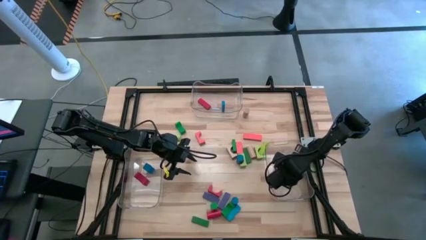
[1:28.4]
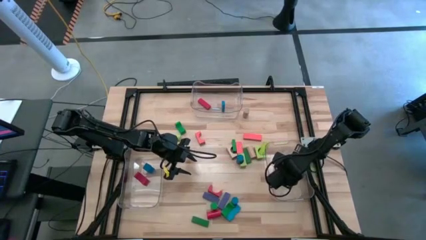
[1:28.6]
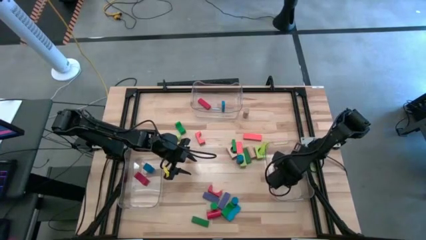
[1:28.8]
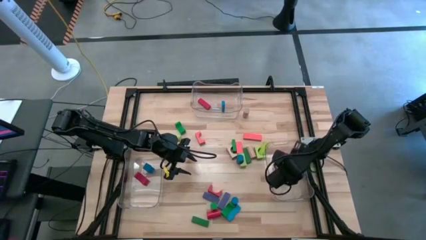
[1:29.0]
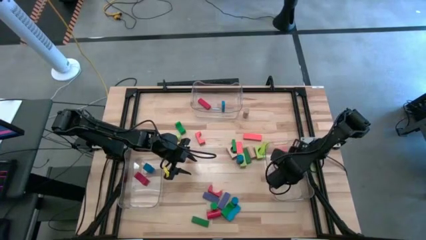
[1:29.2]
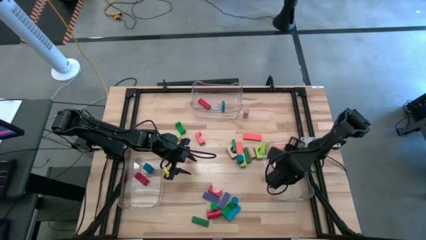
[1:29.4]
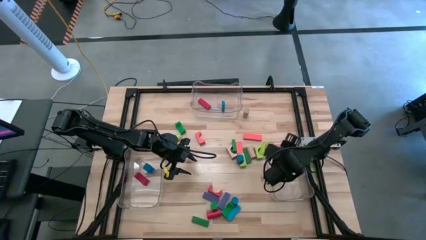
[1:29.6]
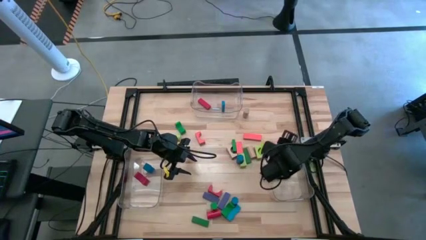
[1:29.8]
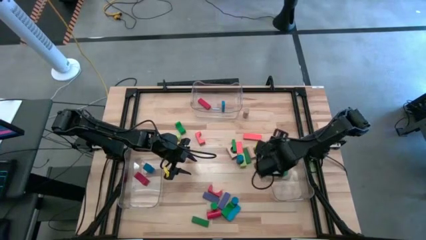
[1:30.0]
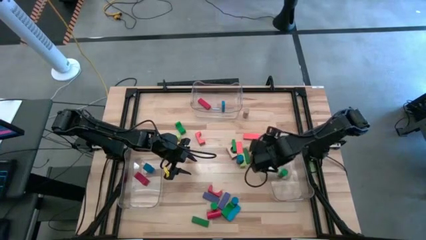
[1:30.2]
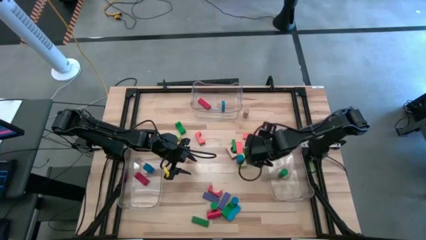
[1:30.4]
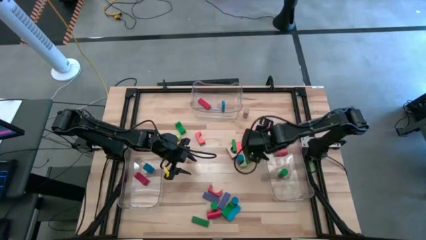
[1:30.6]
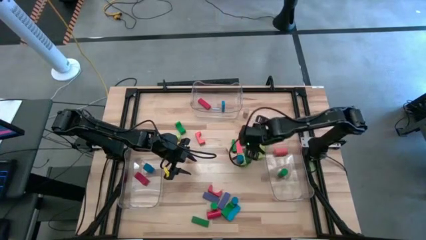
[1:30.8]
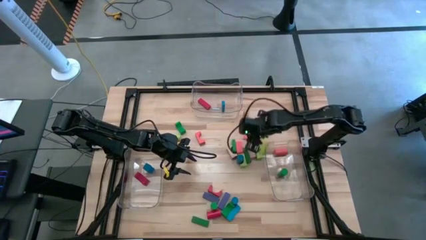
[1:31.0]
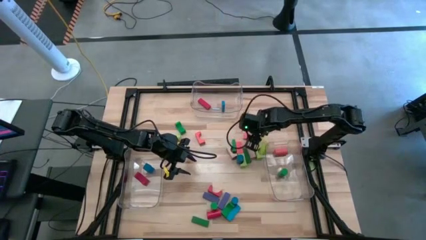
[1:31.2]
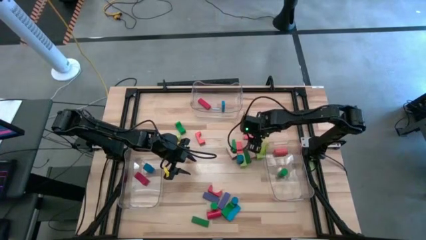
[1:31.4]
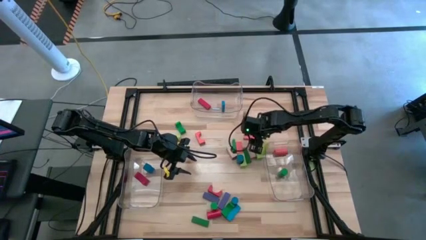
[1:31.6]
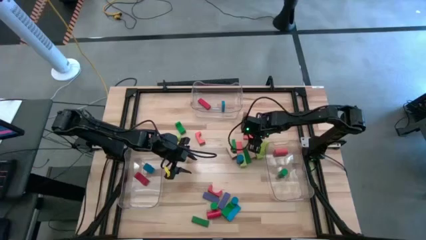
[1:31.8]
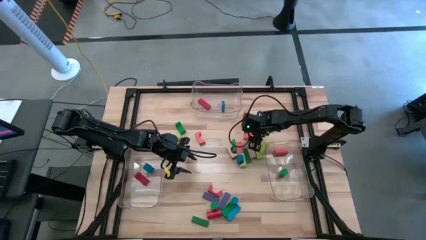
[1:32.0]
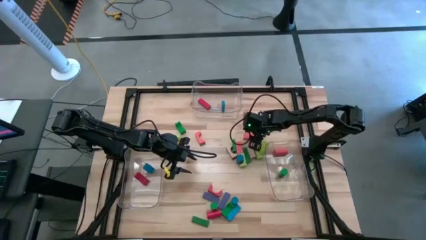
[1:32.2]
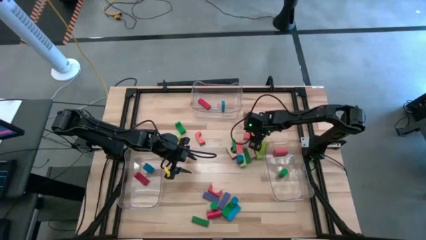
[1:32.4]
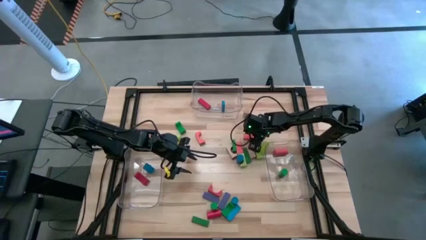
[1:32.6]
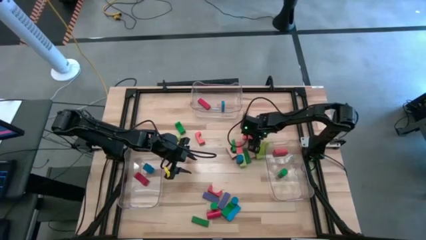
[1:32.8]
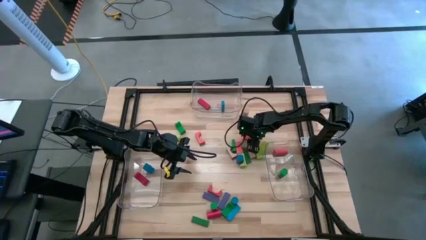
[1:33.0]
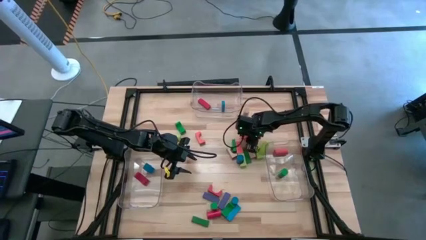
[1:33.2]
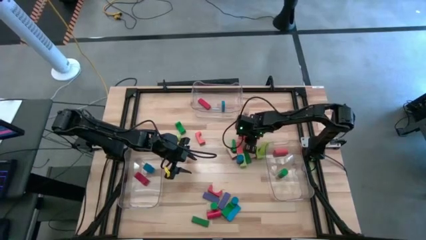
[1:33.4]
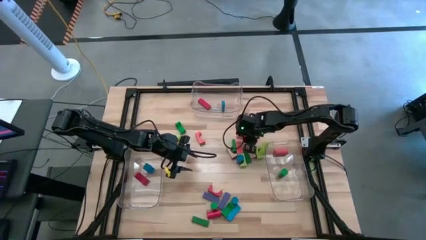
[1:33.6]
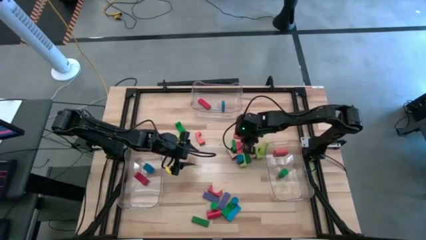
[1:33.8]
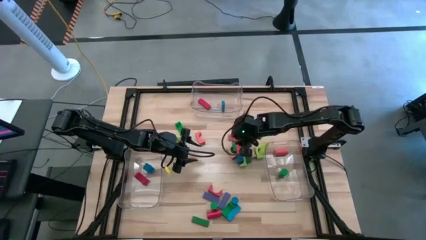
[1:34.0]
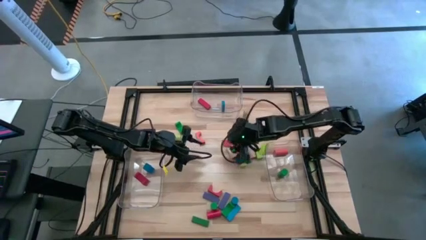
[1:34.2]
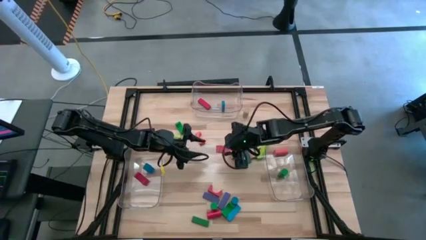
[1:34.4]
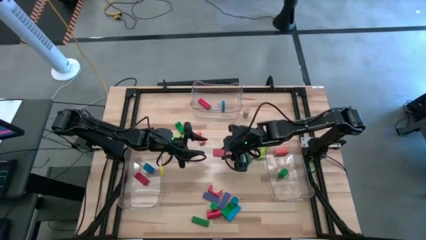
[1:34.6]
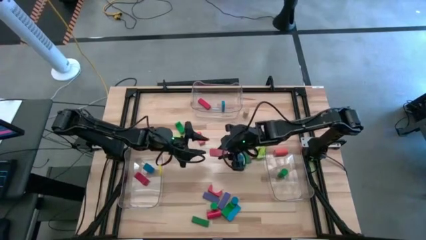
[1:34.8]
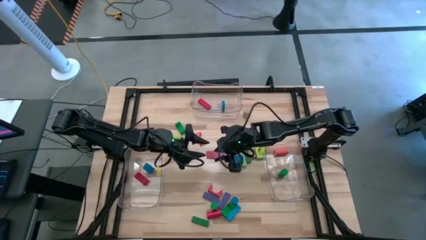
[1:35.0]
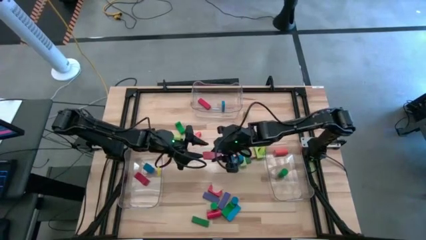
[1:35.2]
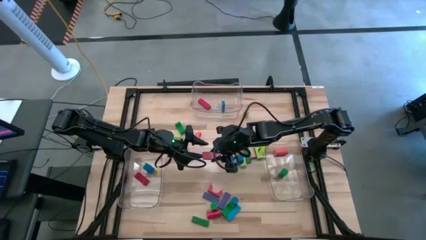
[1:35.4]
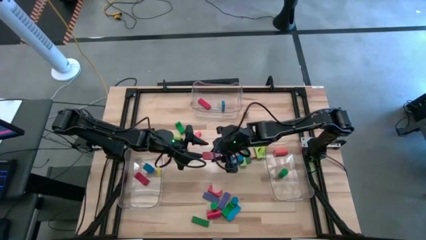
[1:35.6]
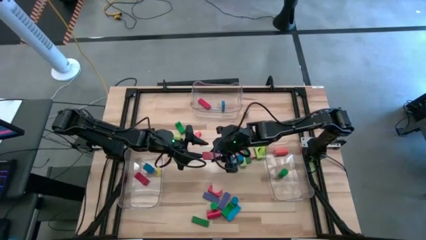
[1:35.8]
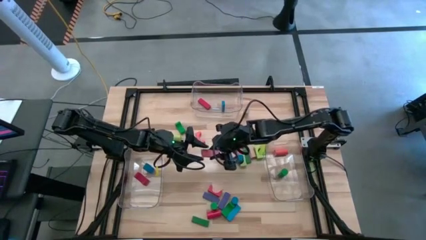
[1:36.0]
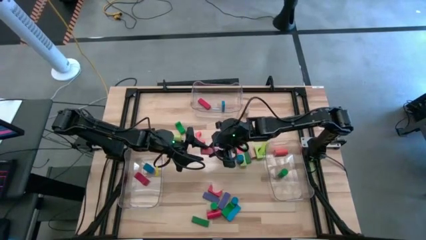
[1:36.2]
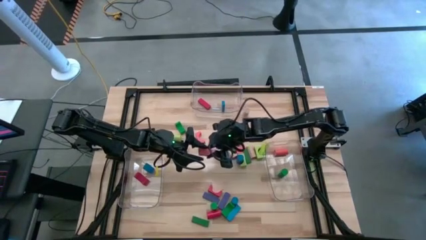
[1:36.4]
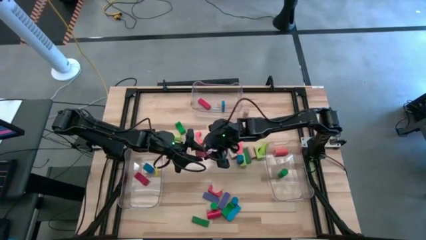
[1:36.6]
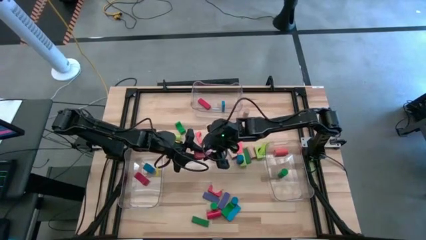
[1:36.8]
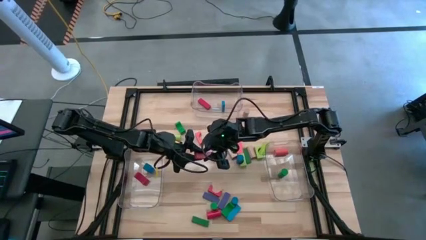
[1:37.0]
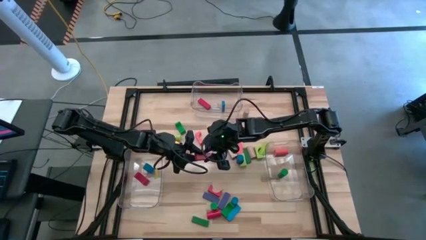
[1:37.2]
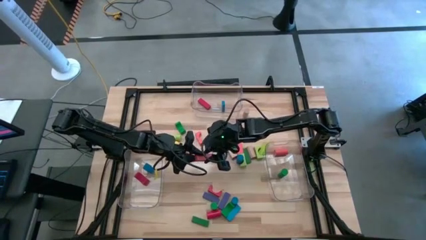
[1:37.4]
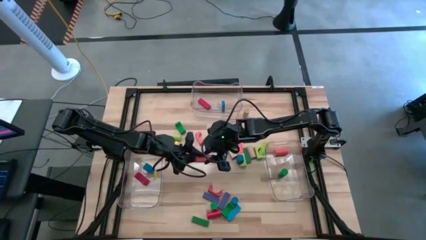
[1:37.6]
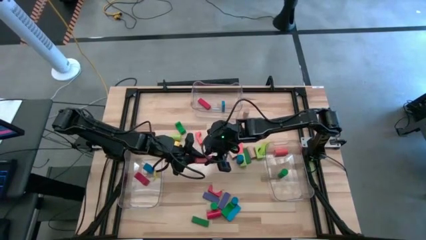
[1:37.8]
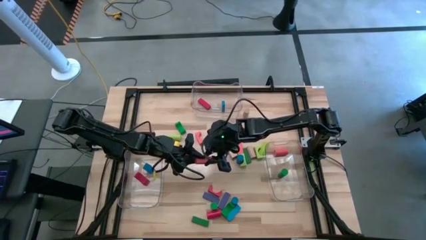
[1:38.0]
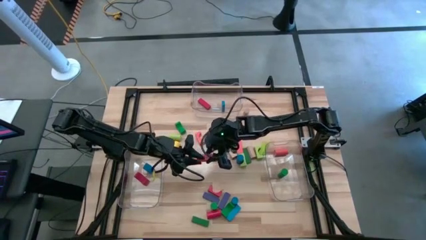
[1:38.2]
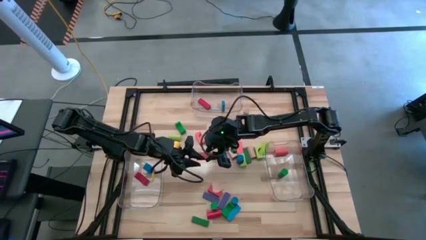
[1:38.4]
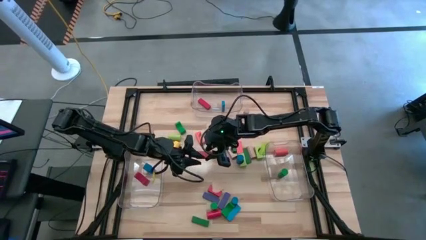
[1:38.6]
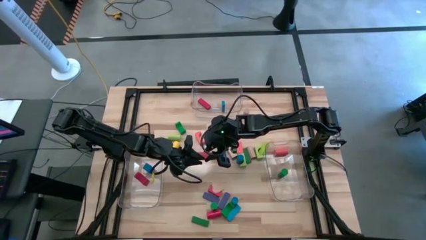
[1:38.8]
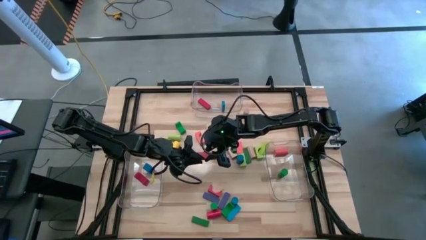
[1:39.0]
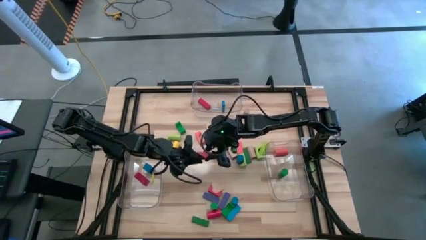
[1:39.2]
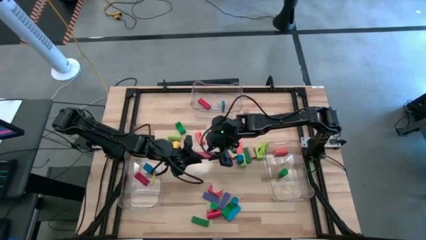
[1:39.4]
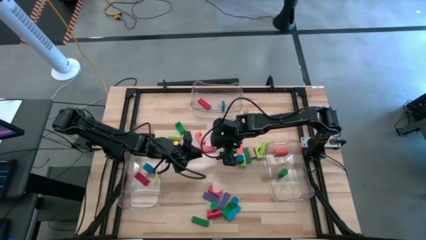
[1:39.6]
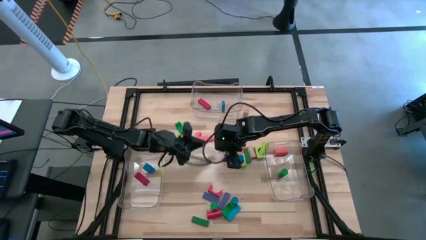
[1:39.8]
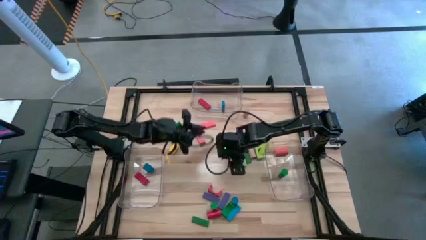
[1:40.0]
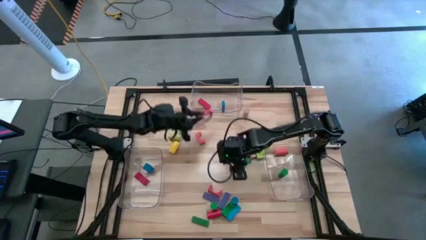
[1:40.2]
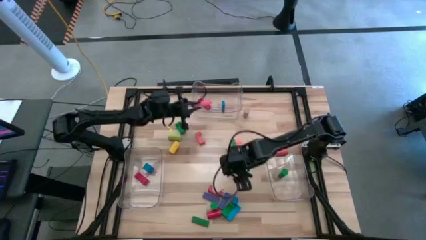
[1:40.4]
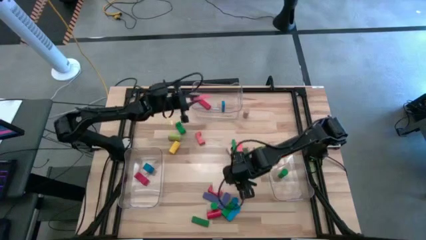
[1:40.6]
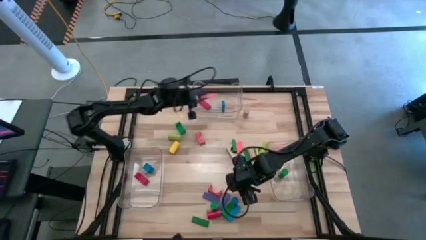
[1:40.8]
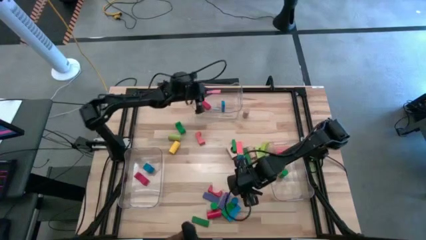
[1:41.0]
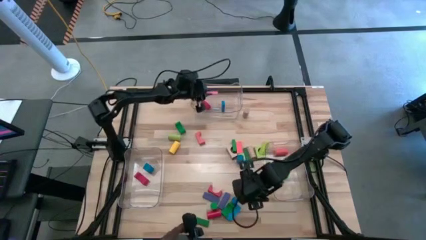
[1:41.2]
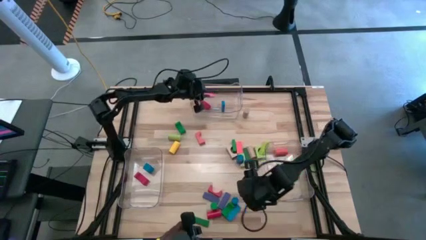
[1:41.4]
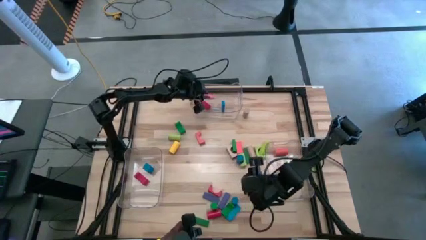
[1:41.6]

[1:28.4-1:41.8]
Task: Sort blocks by size
Put the orange rectangular block into the top transparent bin
